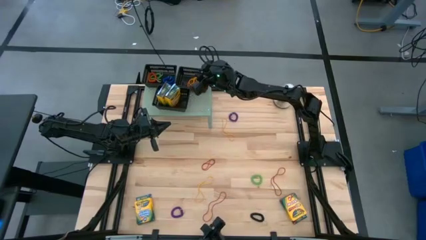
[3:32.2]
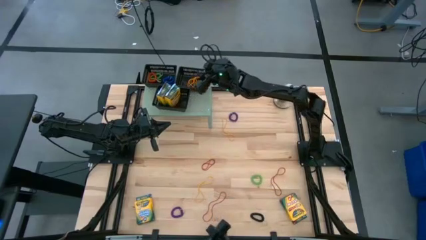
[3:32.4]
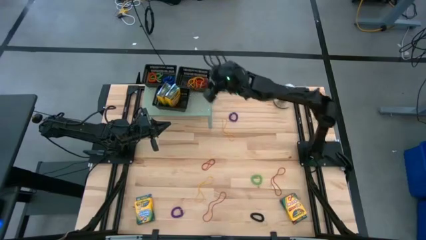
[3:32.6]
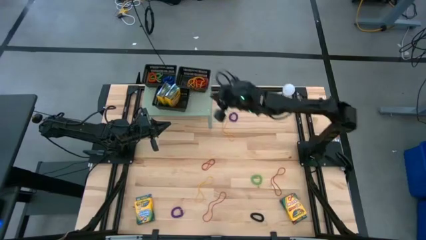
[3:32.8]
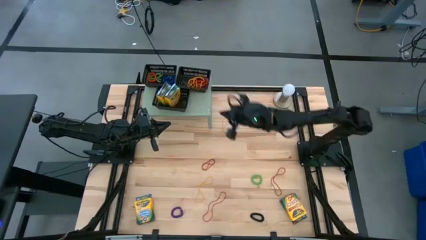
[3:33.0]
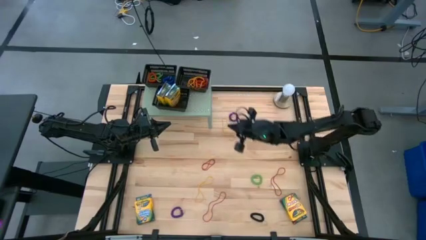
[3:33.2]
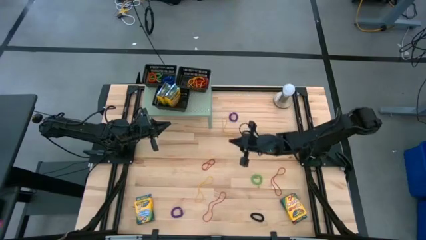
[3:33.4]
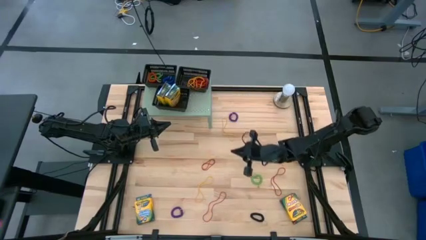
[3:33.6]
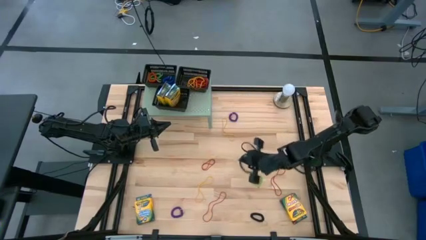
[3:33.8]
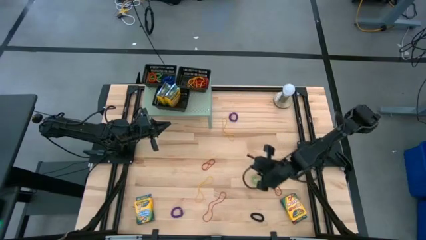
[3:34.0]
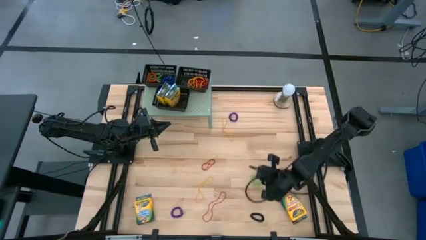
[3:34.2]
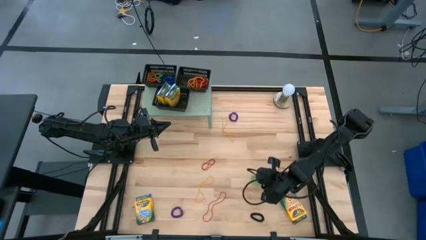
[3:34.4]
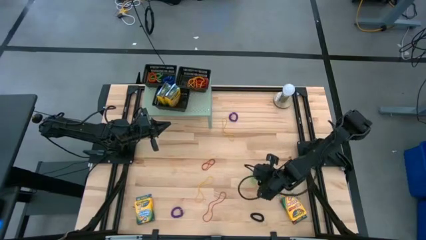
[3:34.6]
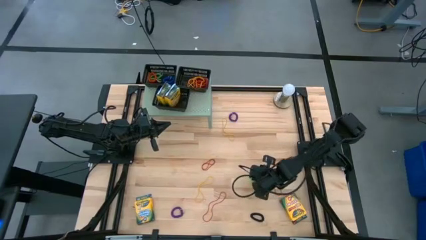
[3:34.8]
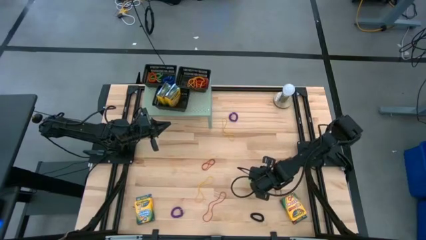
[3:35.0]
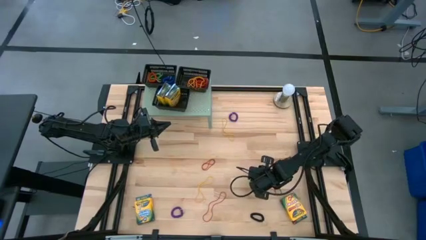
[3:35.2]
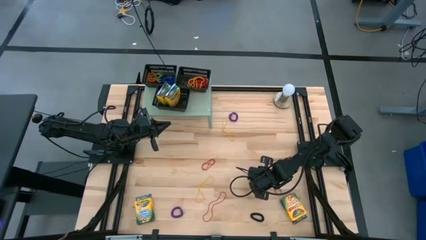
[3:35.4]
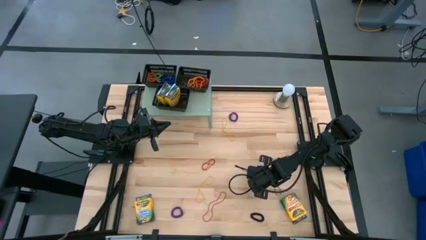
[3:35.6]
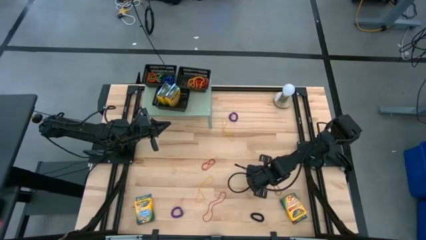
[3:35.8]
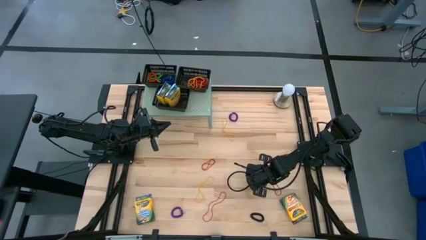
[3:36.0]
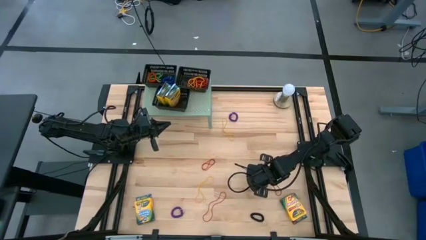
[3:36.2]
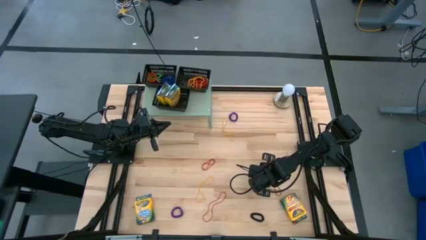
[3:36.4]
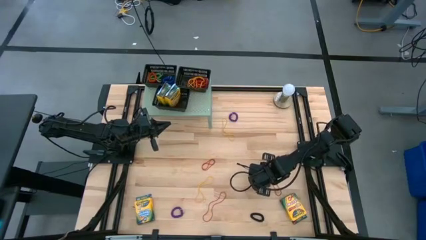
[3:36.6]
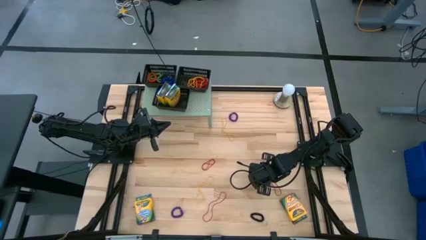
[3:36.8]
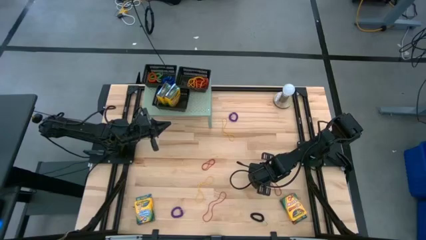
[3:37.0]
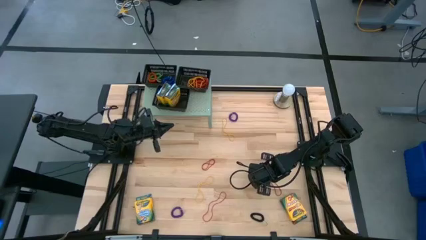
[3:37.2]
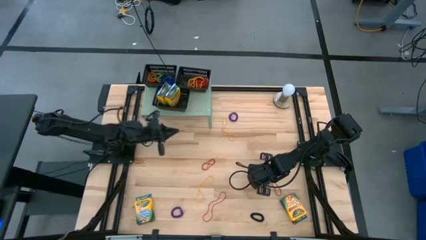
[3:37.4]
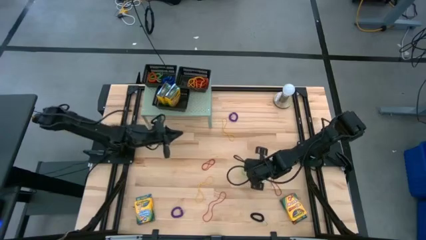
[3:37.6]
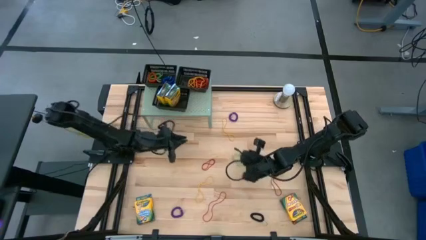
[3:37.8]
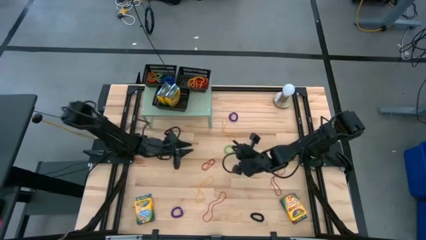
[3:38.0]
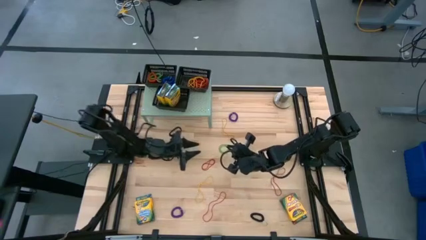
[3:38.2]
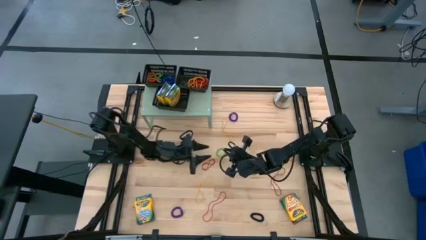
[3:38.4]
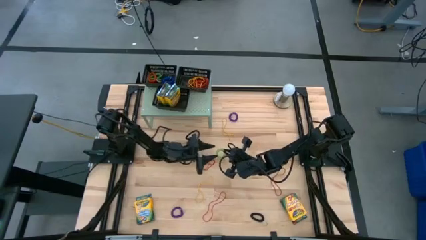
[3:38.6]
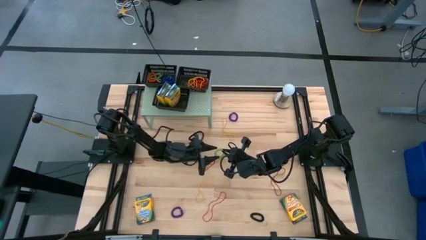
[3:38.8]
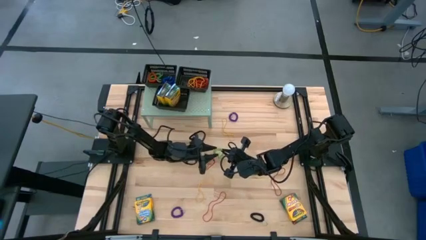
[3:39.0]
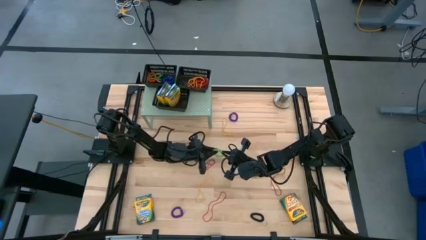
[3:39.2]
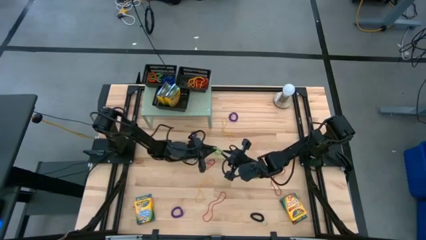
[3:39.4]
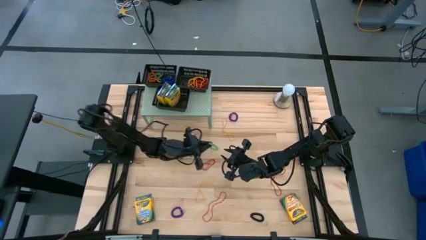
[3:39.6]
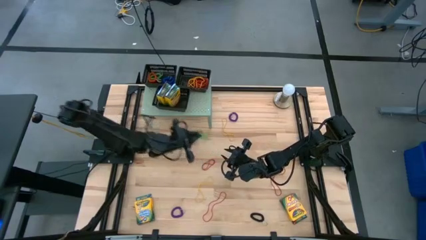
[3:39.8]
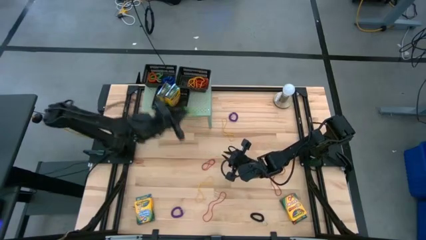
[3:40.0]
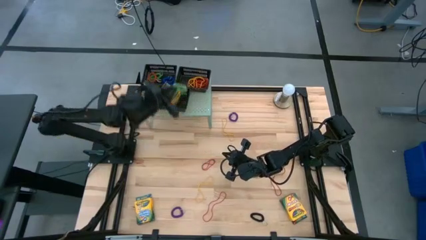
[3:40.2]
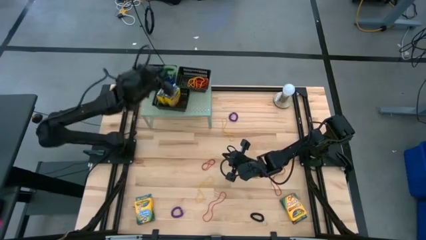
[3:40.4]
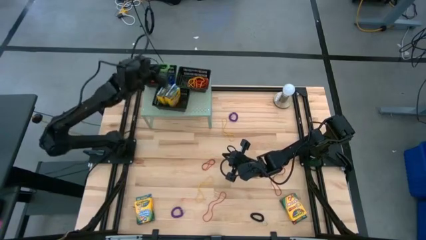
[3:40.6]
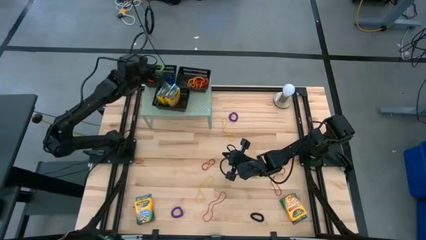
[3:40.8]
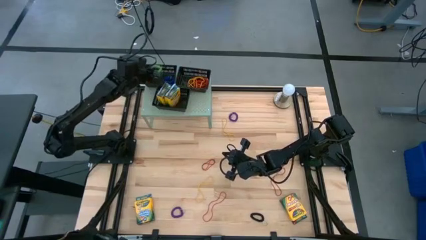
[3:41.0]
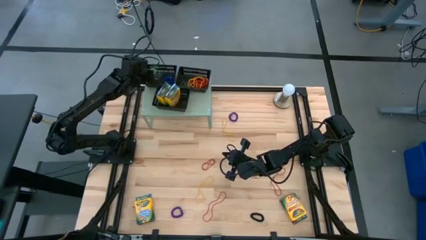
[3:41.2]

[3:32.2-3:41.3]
Task: Pick & Place Office Desk Supplies
Put the green spring rubberband into the top left black bin

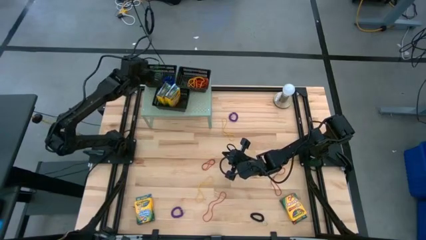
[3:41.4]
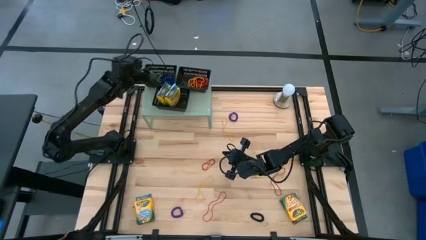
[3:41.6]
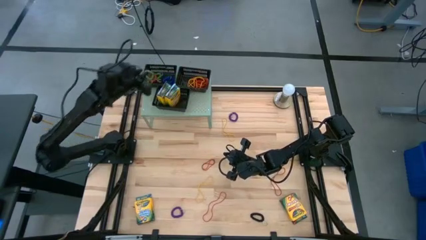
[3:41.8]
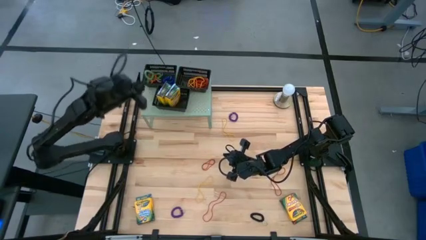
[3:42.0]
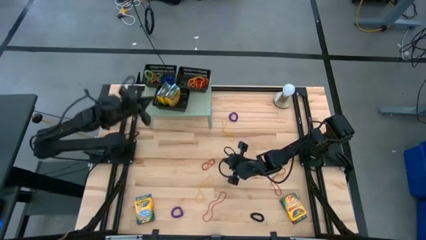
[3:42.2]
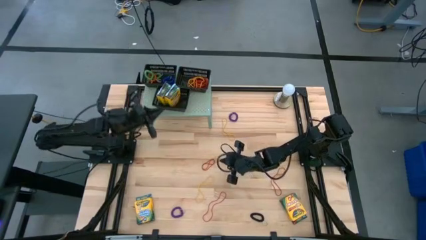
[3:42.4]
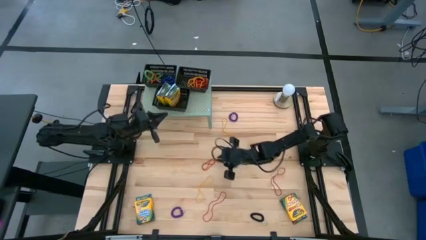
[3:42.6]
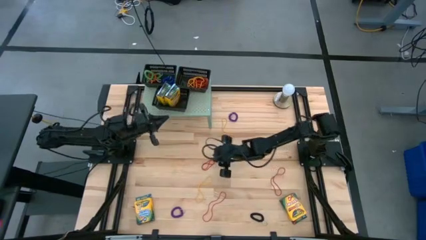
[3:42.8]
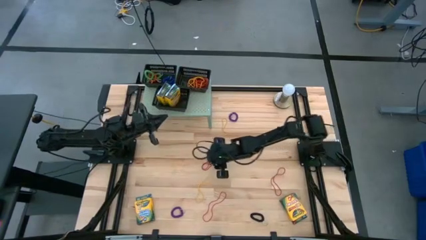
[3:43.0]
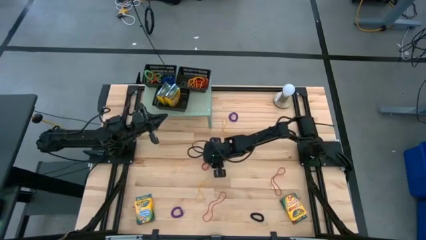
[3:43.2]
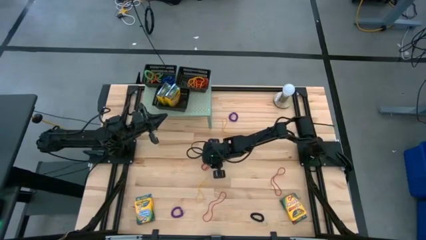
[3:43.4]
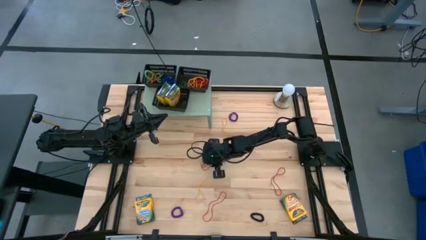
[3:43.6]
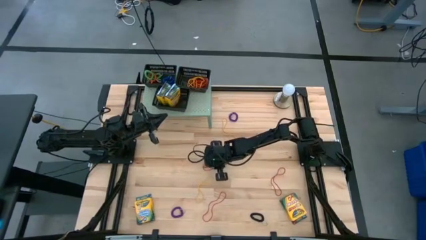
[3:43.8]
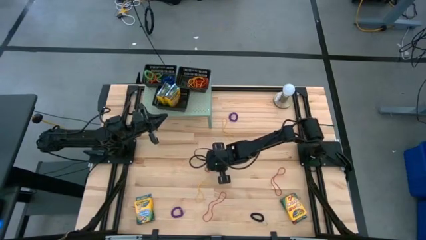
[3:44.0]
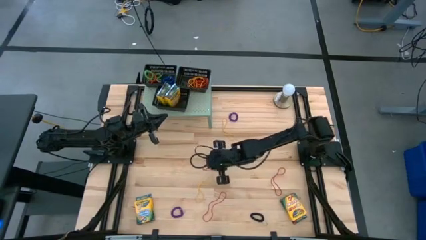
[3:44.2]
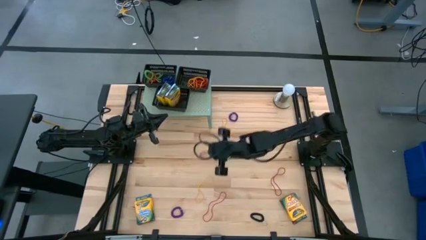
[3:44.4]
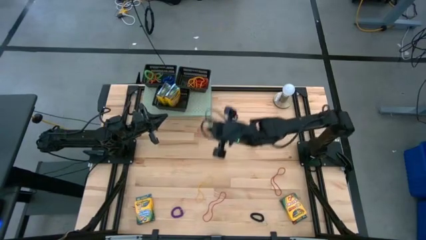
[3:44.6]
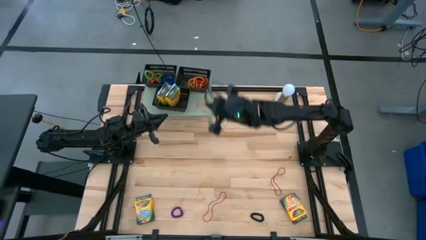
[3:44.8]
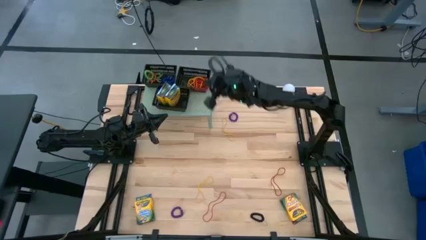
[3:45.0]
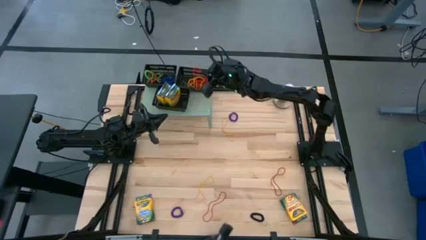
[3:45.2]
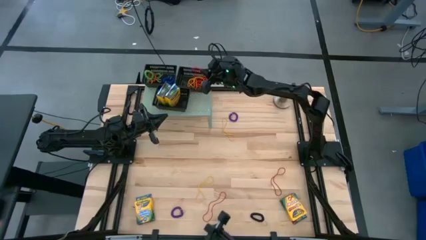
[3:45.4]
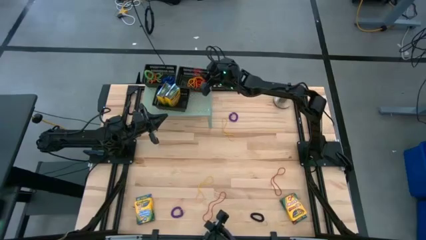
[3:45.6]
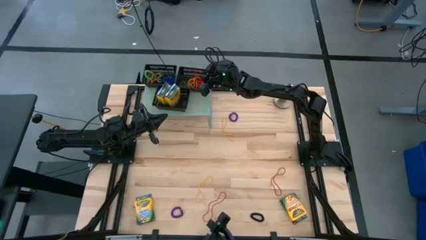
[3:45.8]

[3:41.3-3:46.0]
Put the red rubber band into the top right black bin

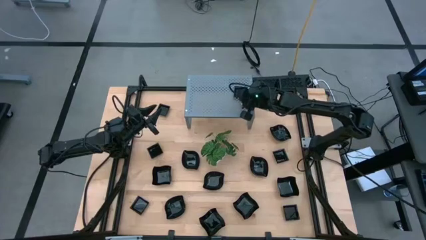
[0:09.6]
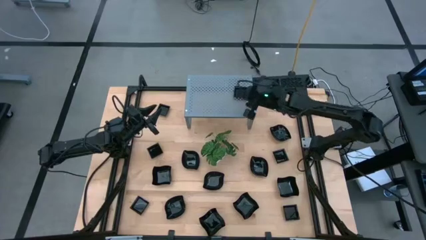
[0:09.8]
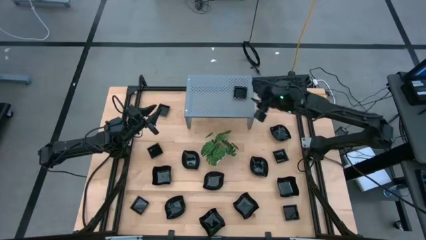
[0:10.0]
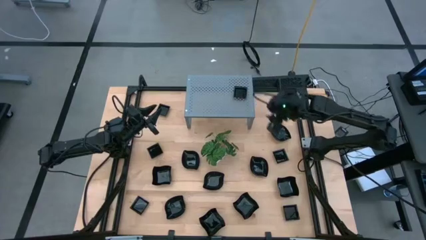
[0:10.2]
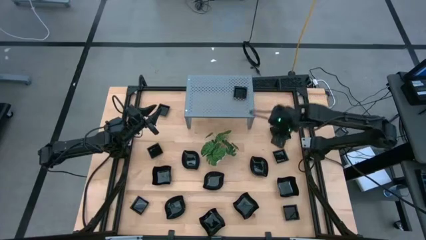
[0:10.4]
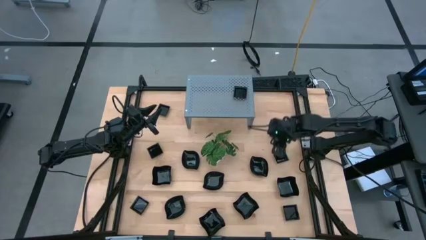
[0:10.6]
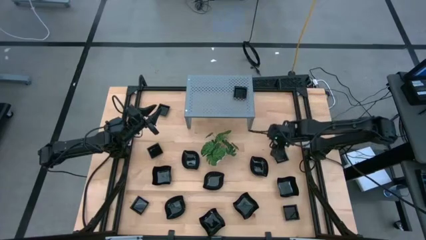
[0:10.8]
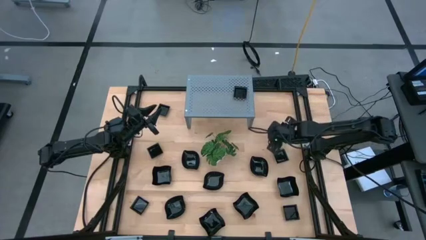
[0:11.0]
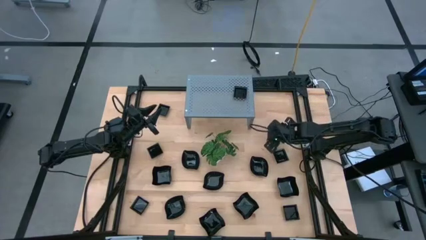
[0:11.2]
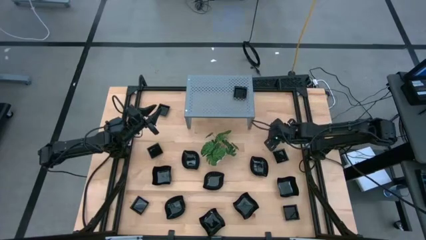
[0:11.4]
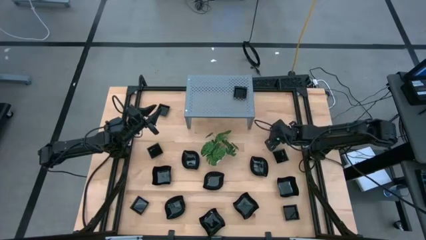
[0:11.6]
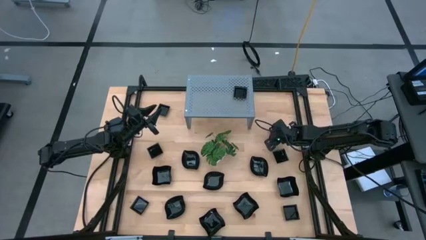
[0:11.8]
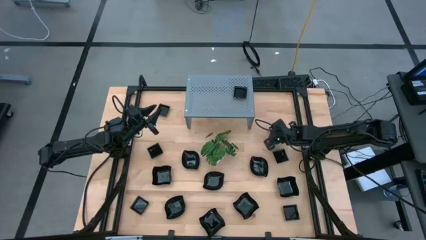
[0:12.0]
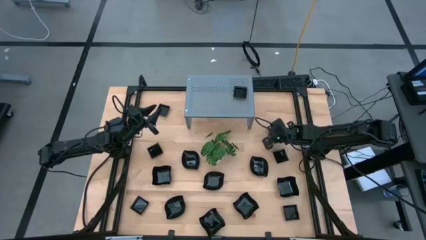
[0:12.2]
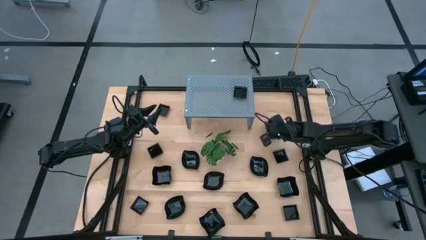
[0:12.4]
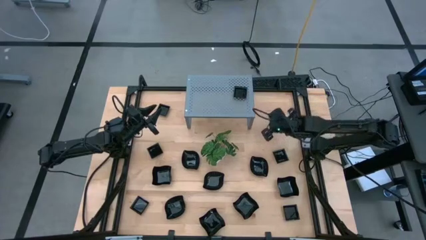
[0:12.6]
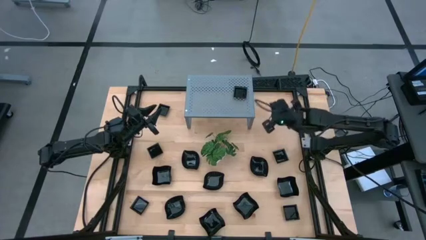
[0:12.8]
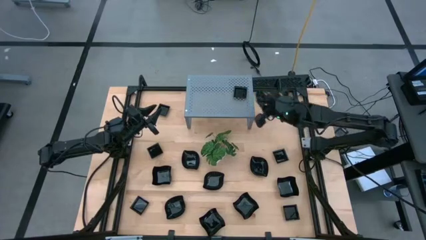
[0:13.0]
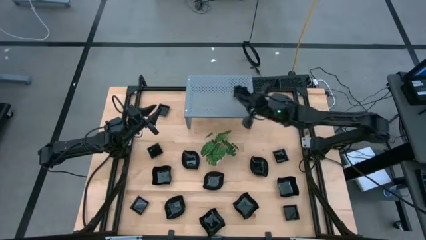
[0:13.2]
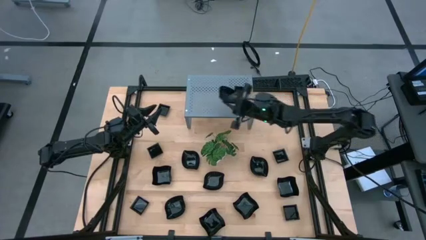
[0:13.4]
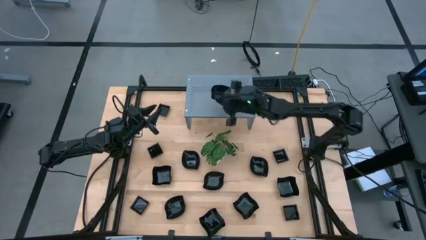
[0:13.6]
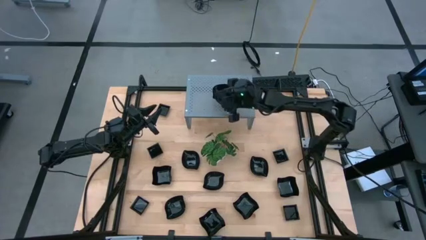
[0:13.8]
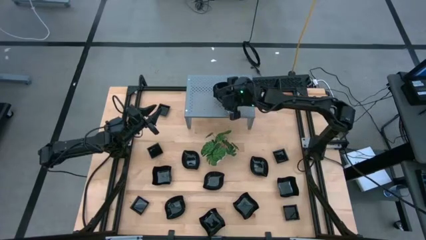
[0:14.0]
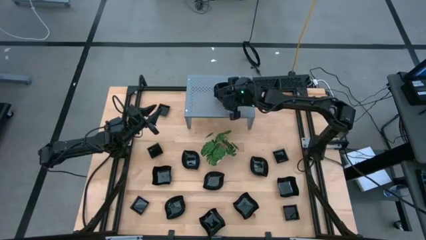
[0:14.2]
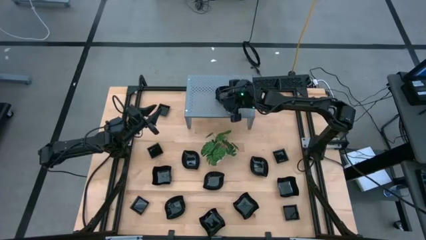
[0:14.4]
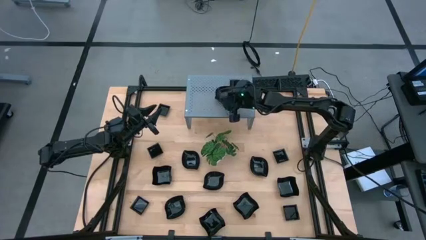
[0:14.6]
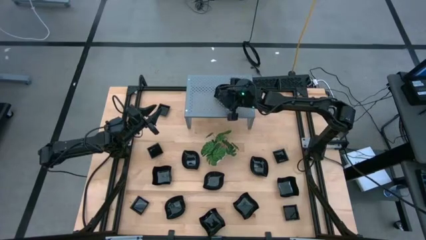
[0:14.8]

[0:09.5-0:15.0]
Task: Pick & Place Mini shaped plates
Put the leaf-shaped plate on the shelf
